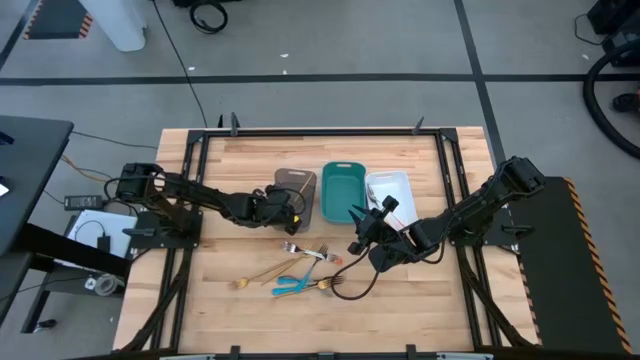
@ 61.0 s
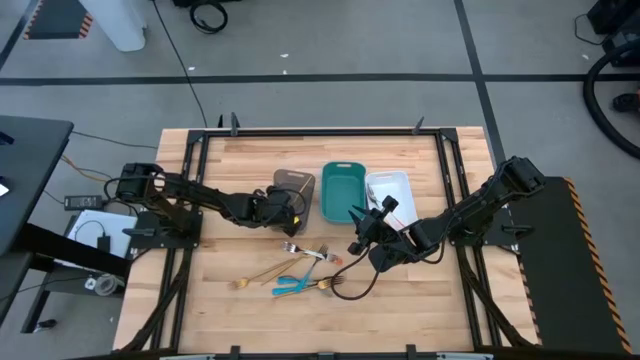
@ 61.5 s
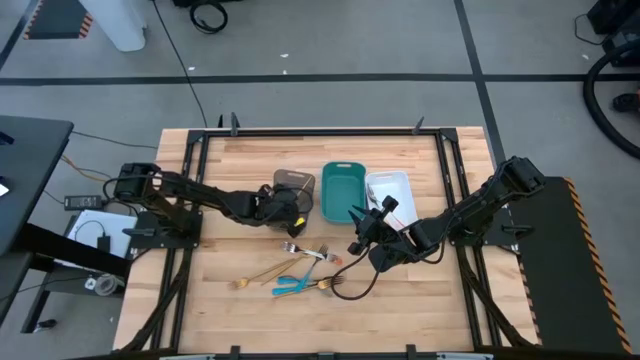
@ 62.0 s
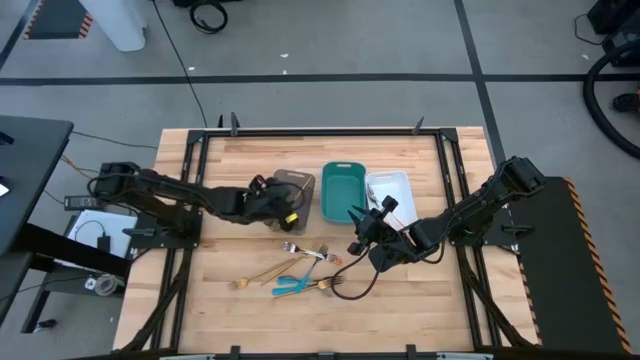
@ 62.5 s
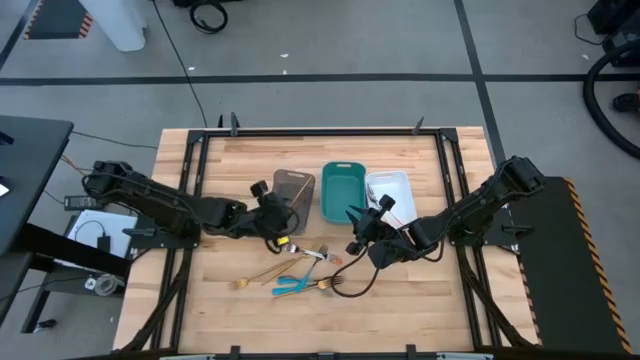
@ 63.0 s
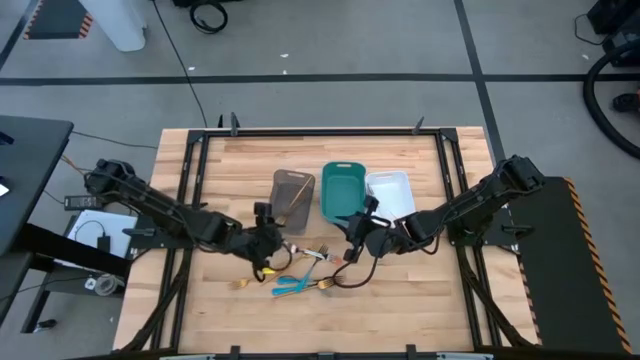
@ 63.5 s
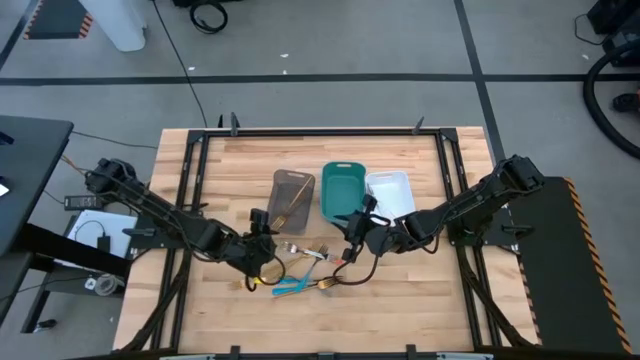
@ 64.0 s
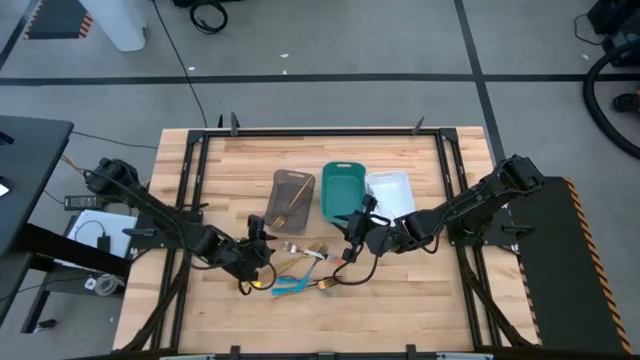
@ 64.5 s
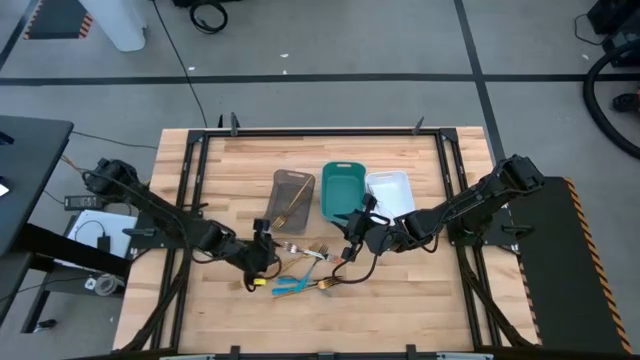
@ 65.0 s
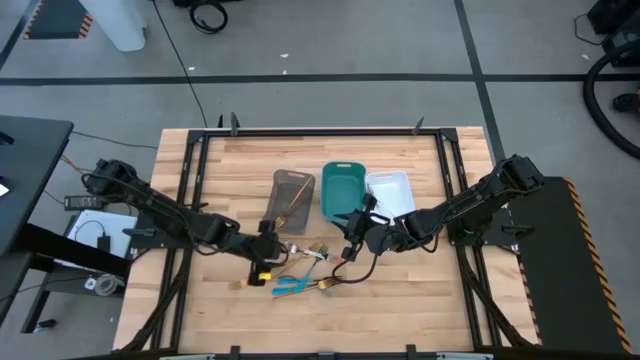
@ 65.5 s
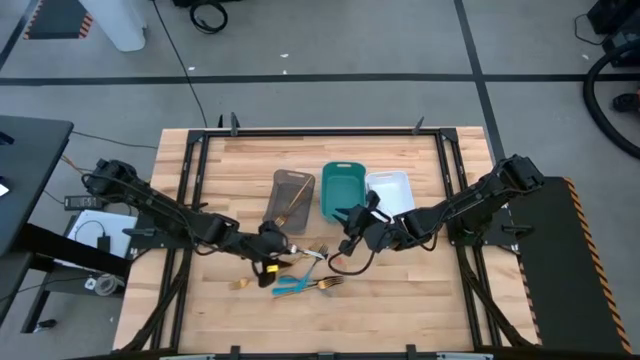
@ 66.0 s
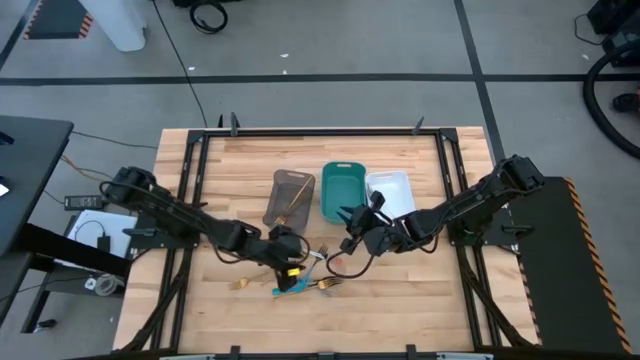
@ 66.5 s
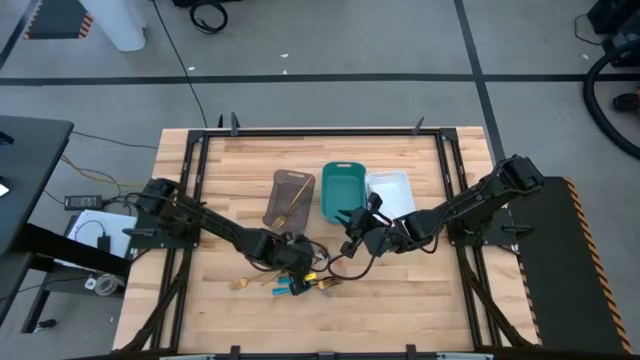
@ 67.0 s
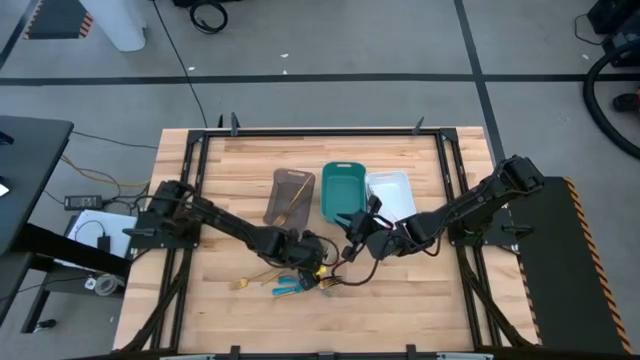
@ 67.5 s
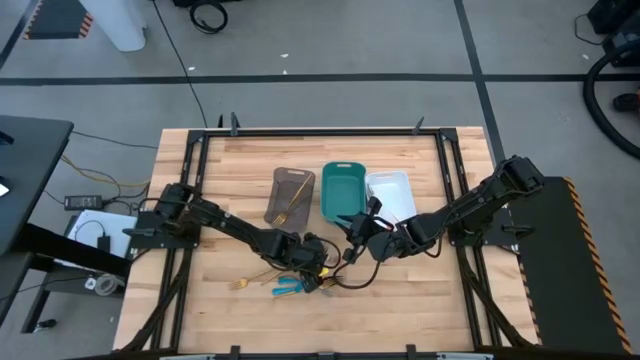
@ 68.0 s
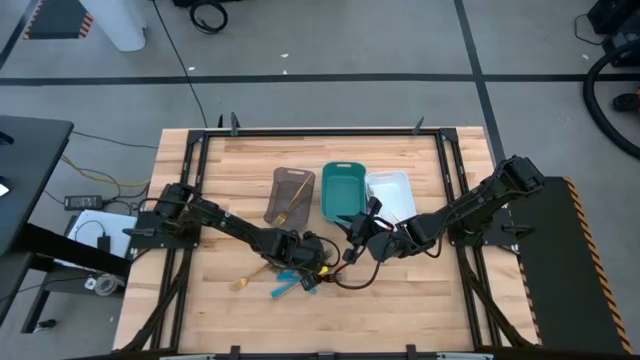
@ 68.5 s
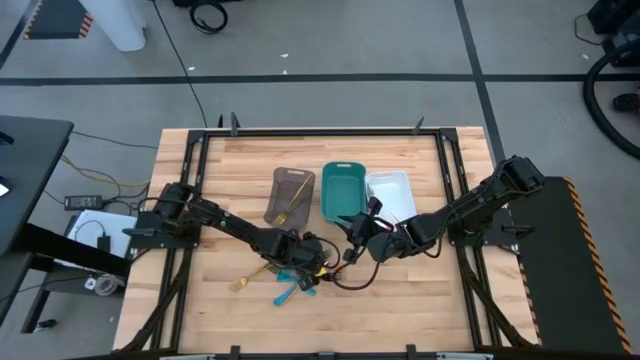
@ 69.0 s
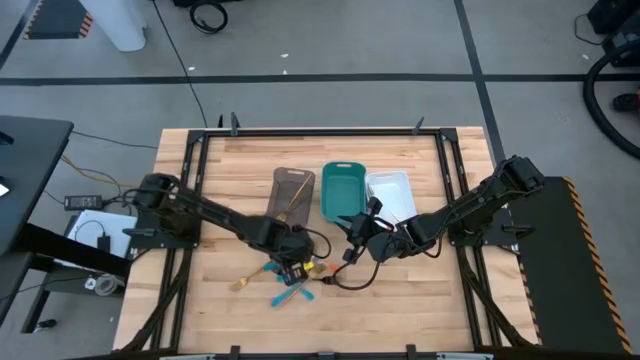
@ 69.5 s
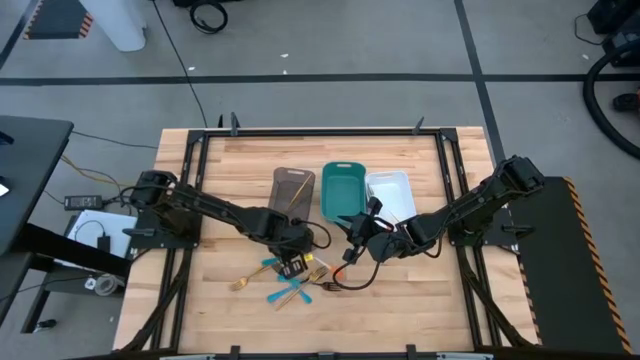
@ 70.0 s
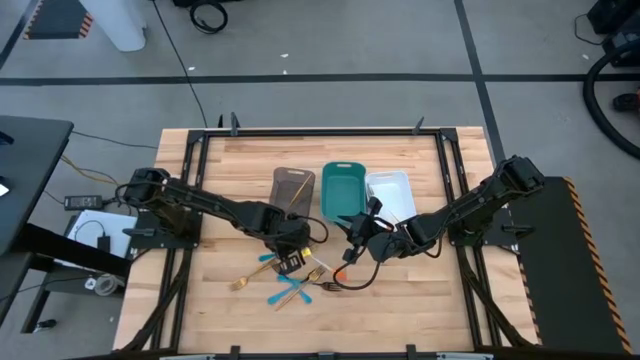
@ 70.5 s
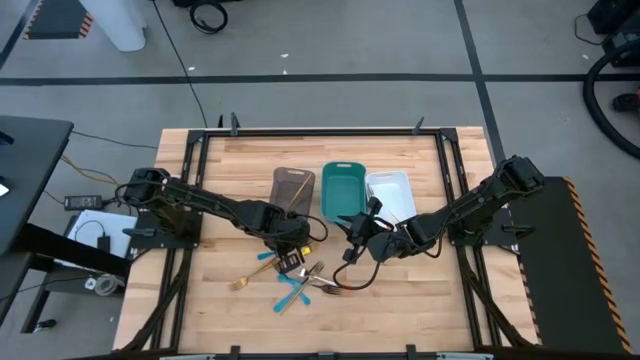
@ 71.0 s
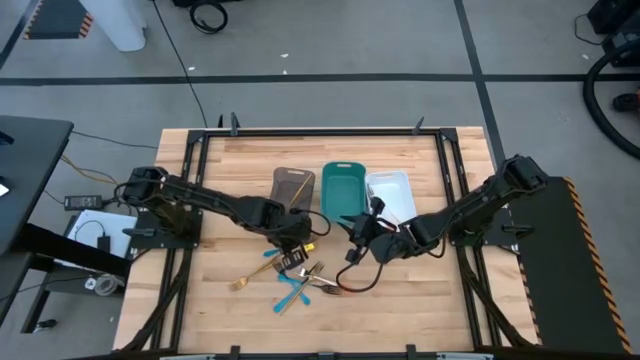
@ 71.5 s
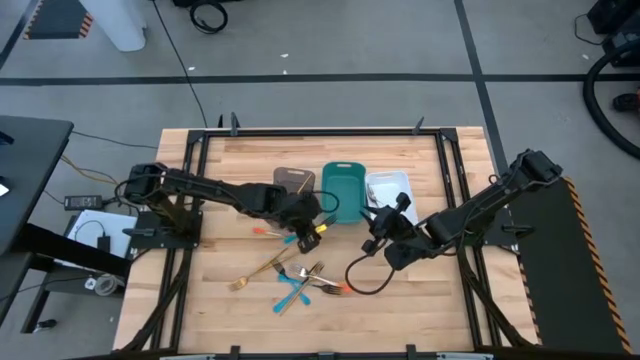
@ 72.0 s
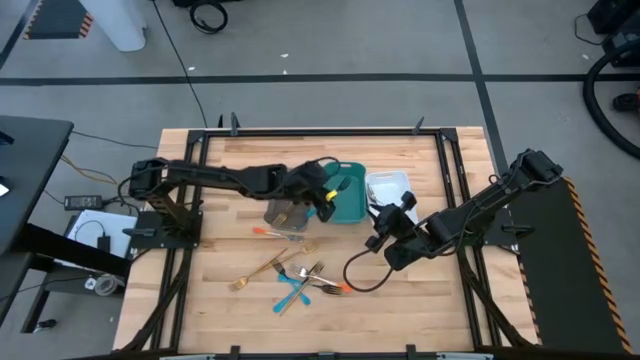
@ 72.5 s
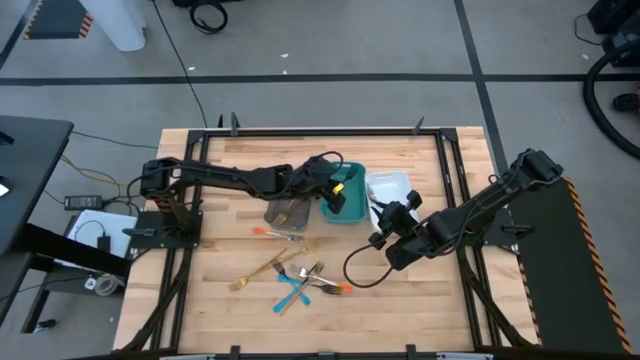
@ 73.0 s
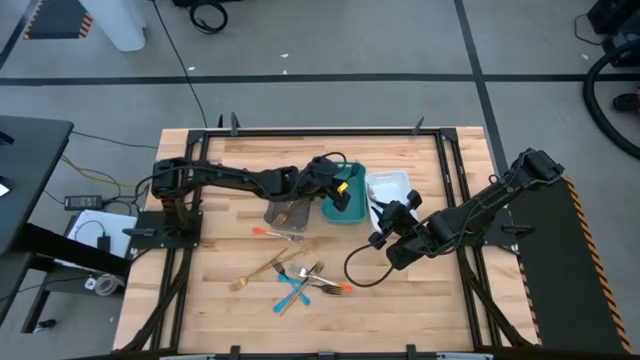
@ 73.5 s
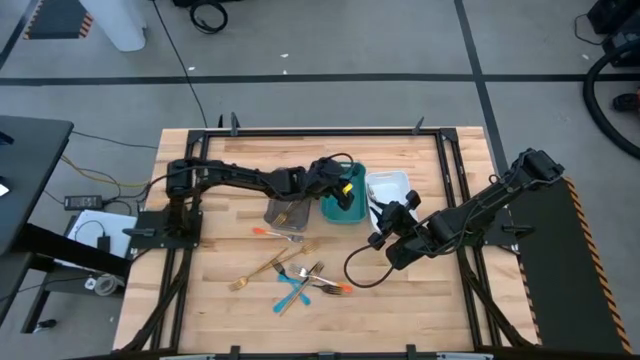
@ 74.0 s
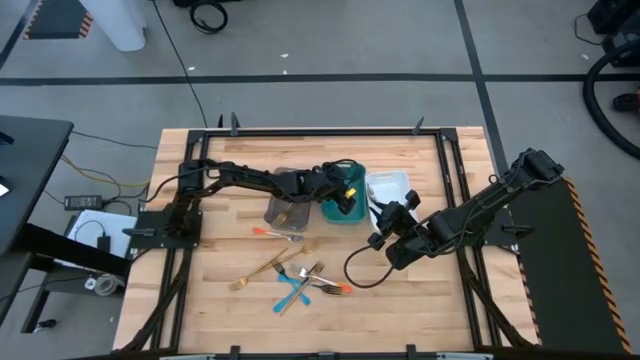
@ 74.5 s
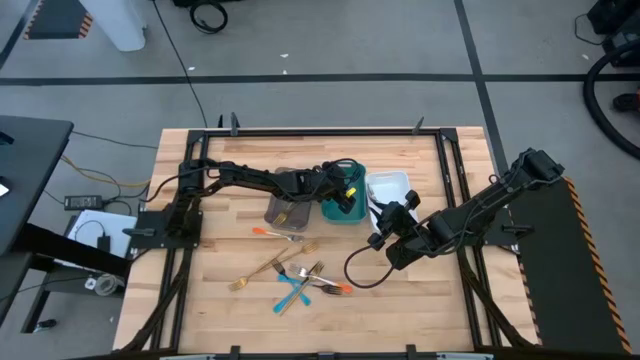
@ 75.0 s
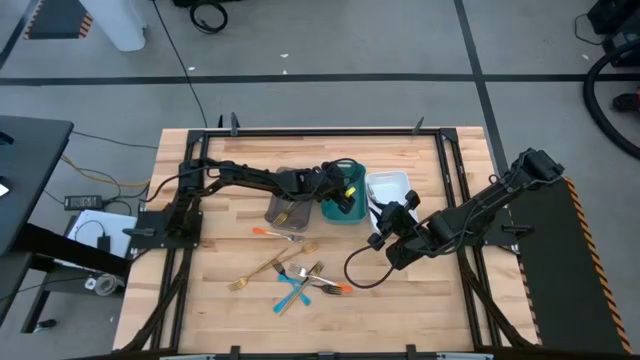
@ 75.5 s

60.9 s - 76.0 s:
Task: Sort silverware by color (type)
Put the blue fork into the green bin

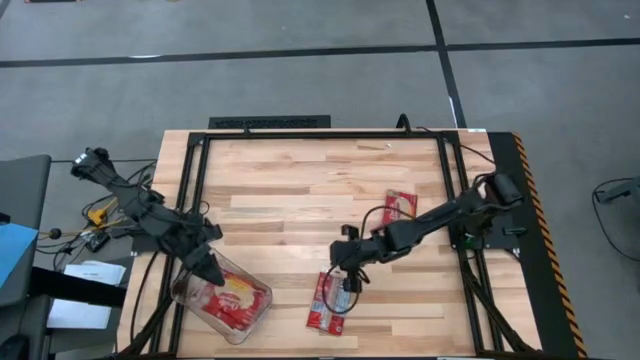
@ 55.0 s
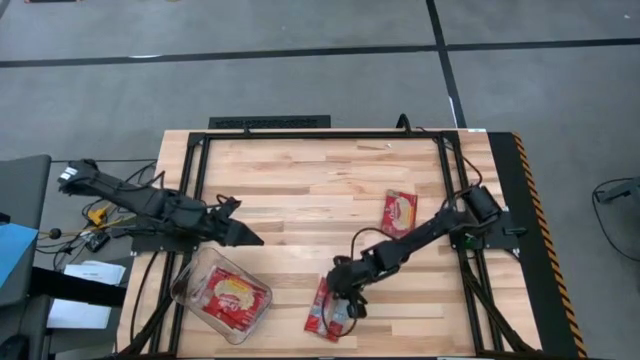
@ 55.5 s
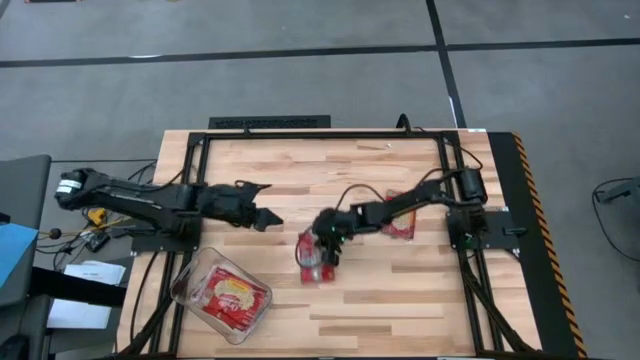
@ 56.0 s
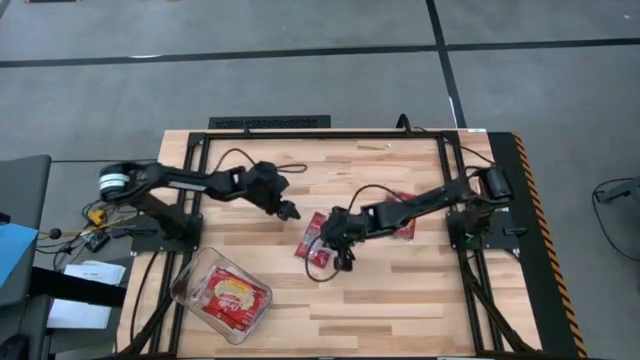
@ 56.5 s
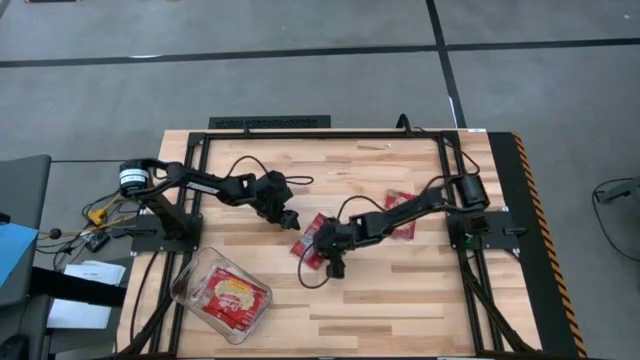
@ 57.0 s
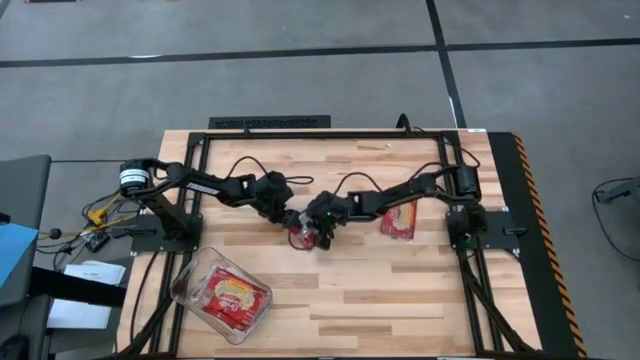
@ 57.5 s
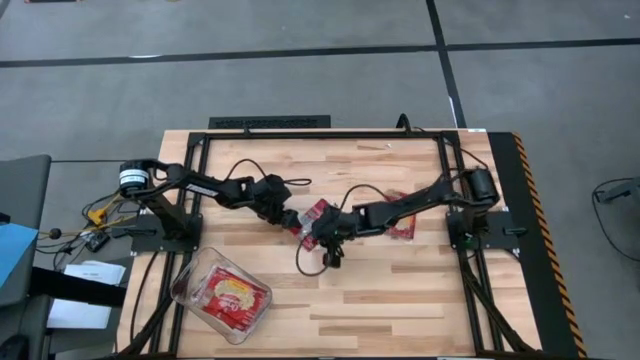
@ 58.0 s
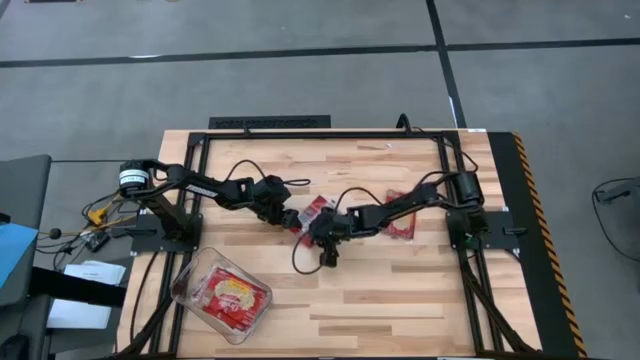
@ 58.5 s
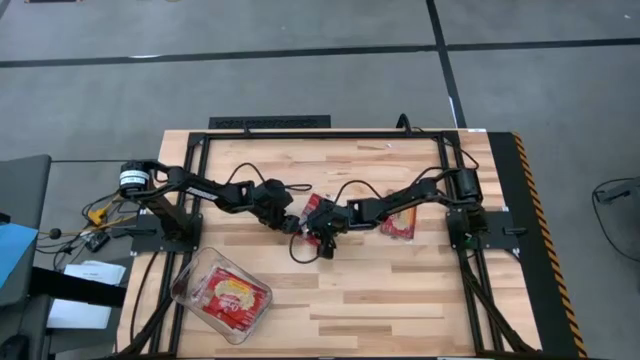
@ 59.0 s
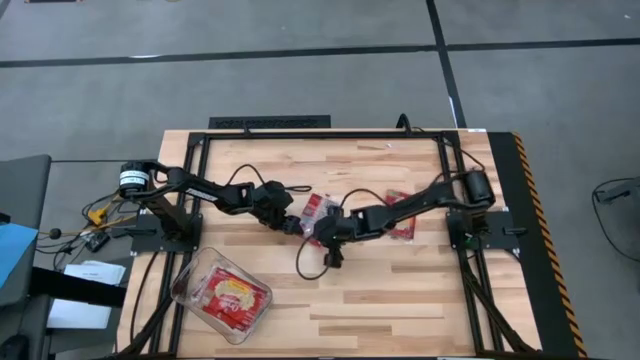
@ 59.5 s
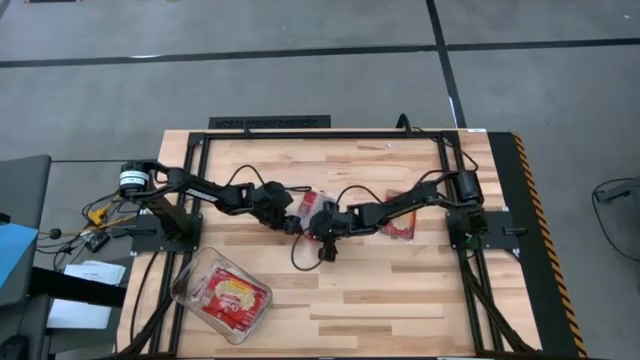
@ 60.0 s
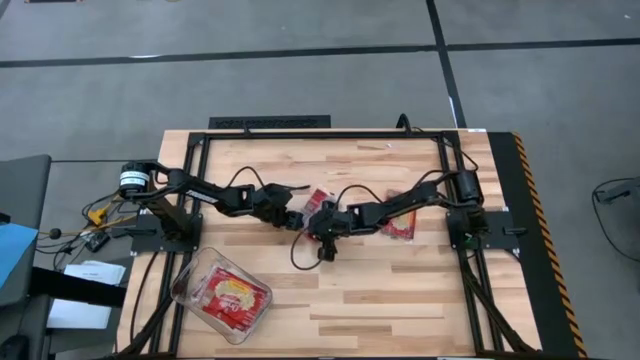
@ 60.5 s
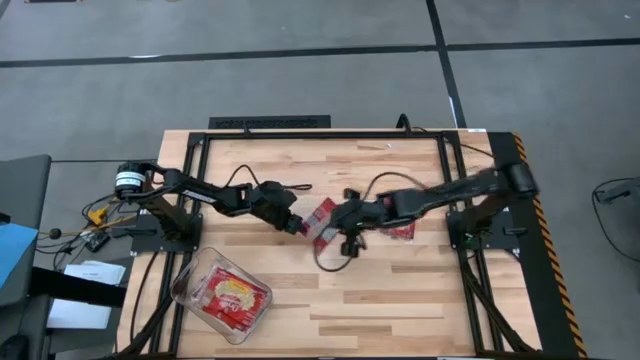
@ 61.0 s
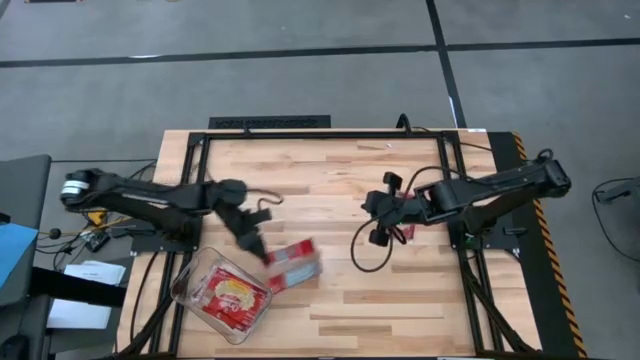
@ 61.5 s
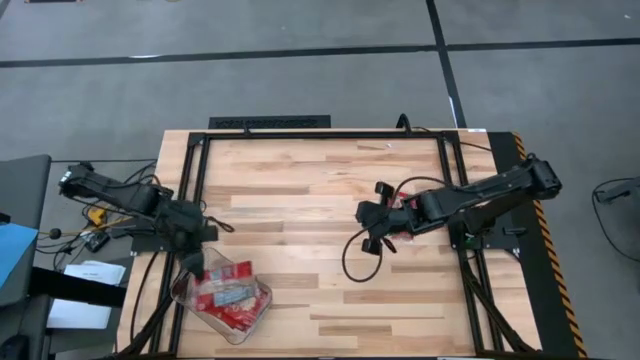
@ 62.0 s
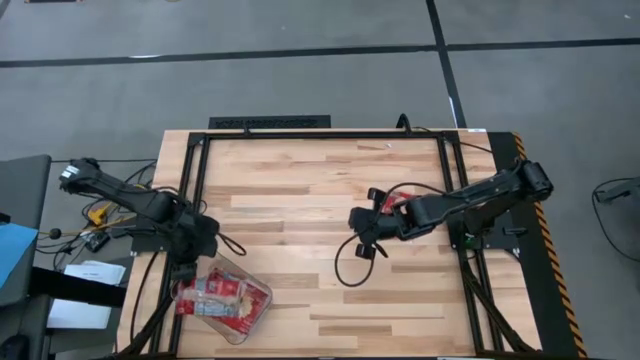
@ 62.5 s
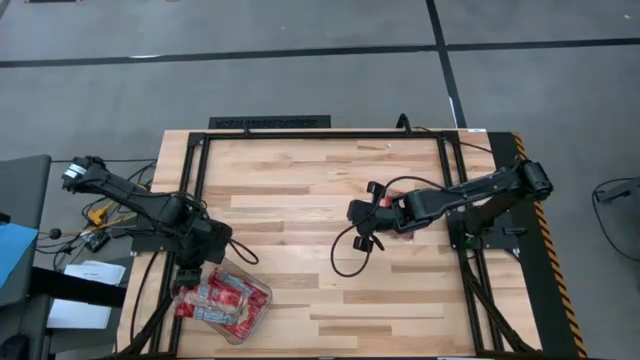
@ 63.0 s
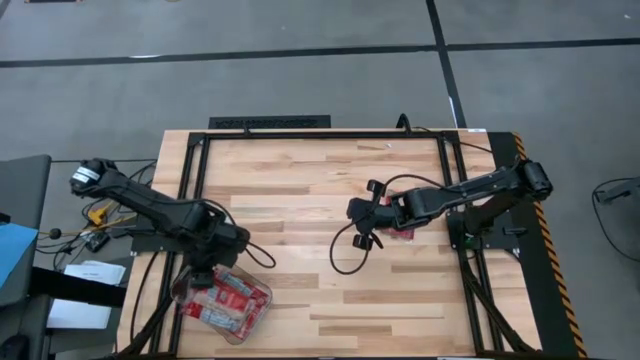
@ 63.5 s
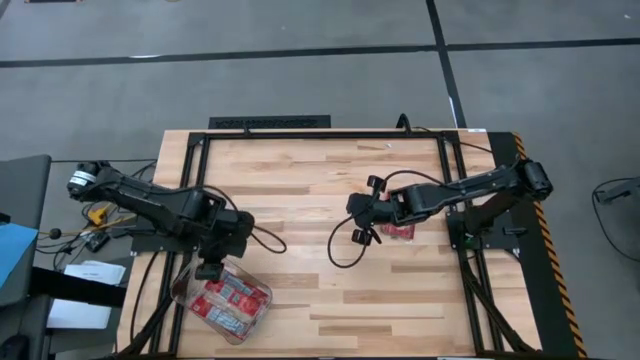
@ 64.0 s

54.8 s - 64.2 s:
Task: Sort popcorn bags into baskets
Put the red popcorn bag into the transparent bin
